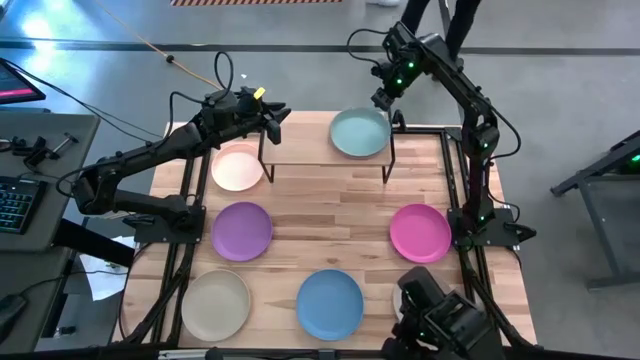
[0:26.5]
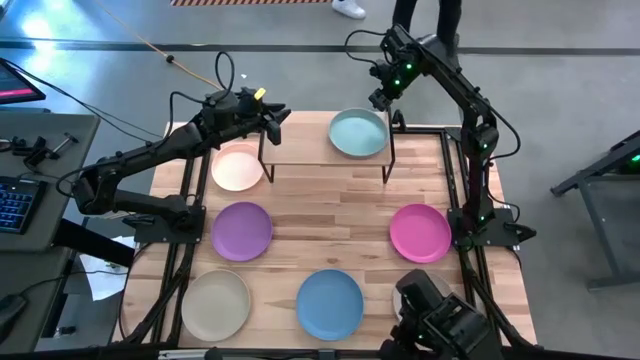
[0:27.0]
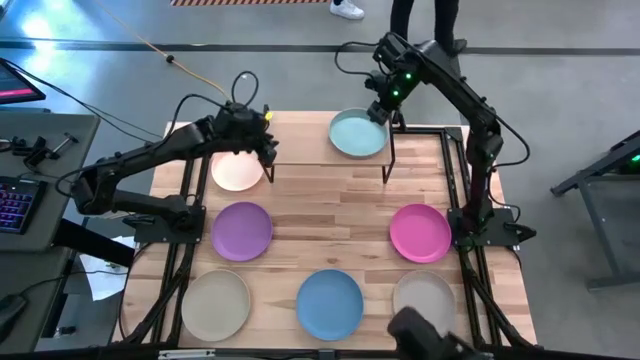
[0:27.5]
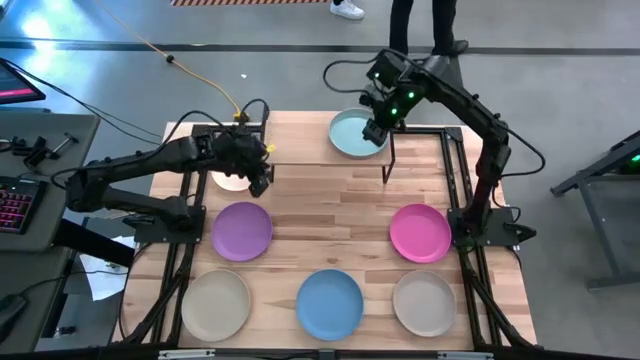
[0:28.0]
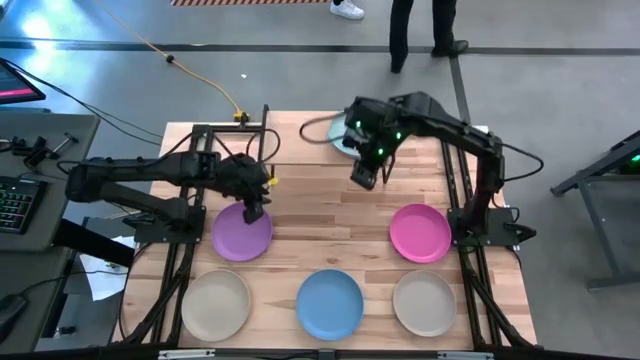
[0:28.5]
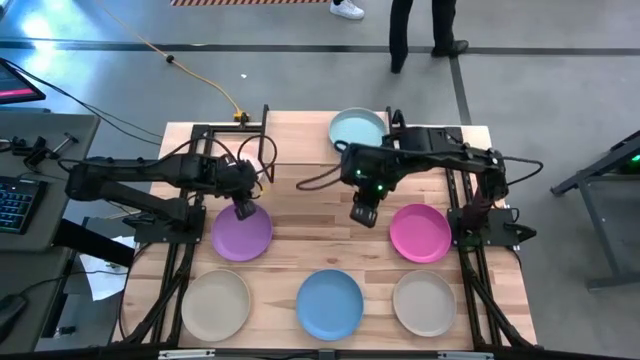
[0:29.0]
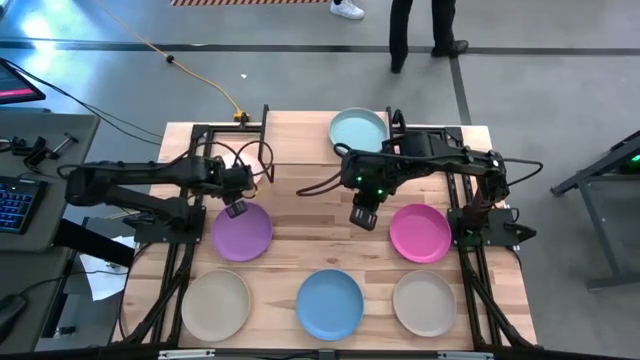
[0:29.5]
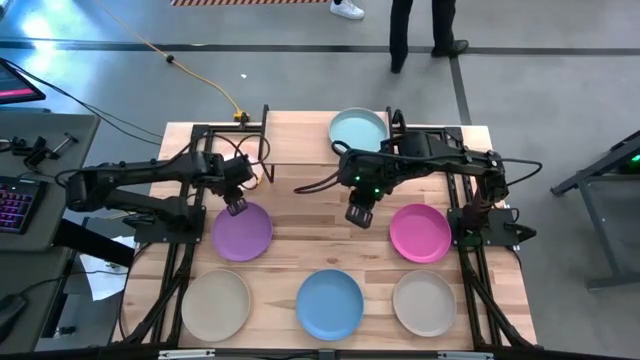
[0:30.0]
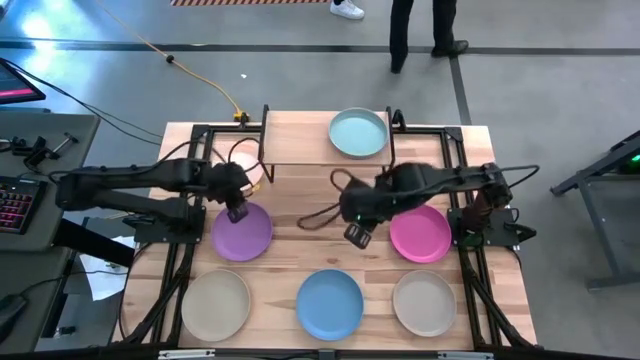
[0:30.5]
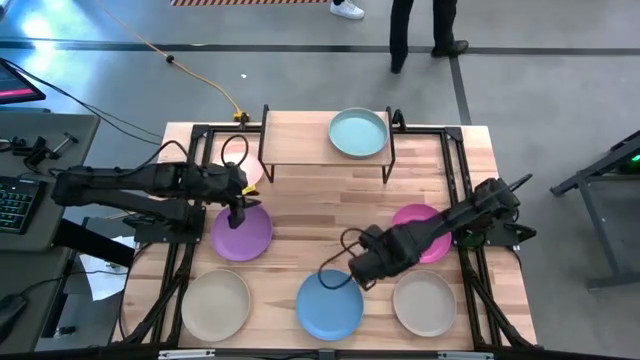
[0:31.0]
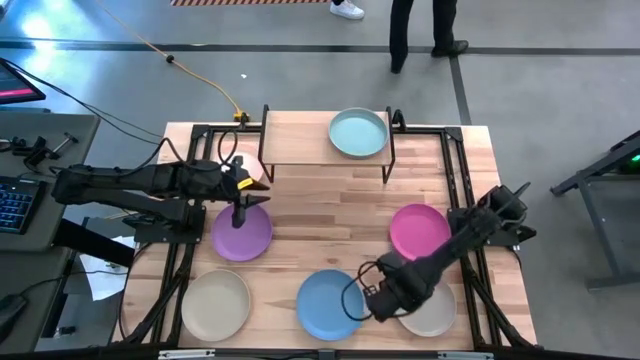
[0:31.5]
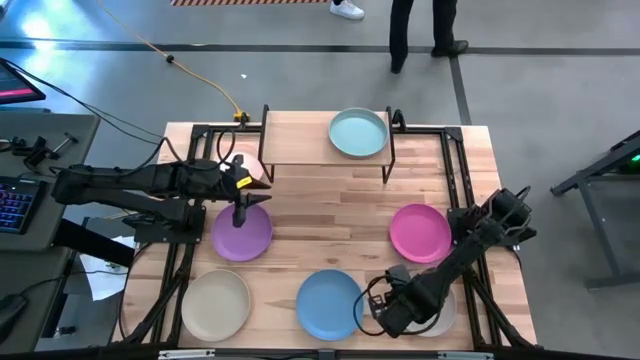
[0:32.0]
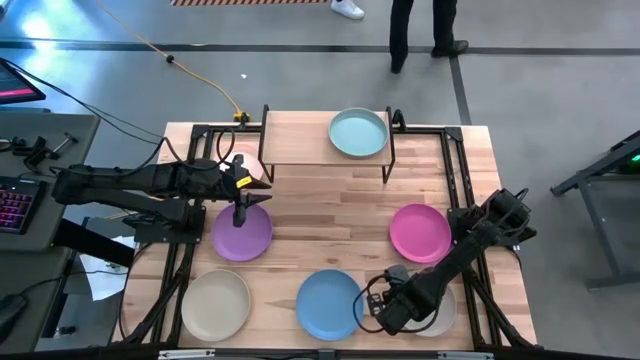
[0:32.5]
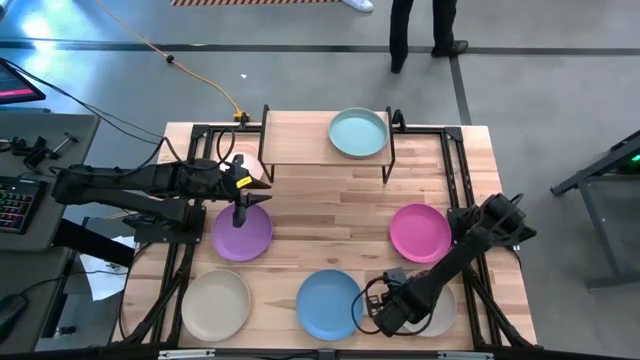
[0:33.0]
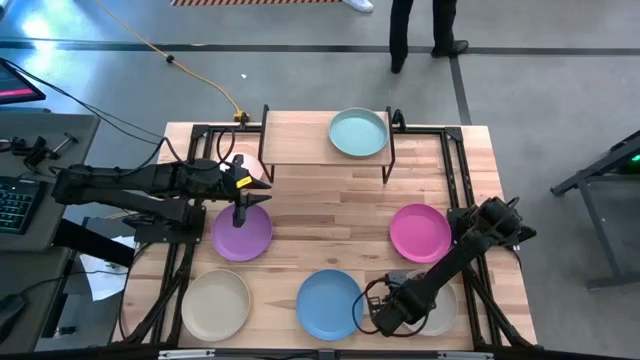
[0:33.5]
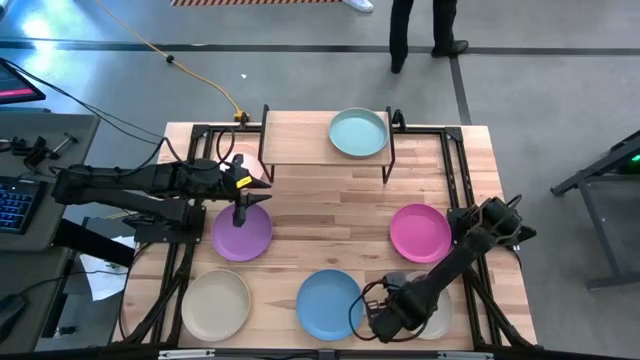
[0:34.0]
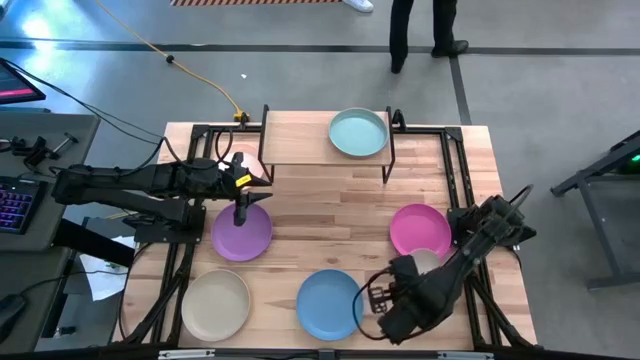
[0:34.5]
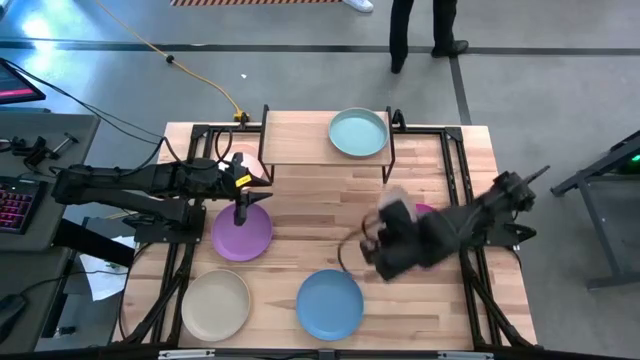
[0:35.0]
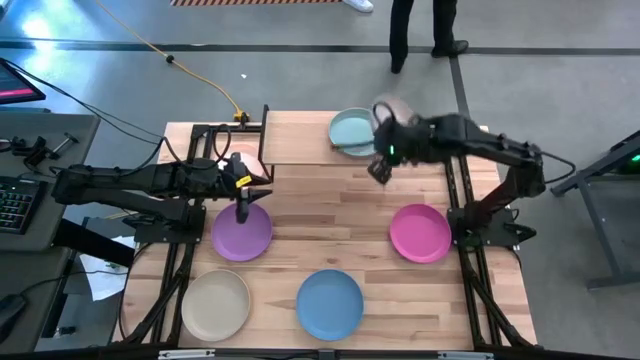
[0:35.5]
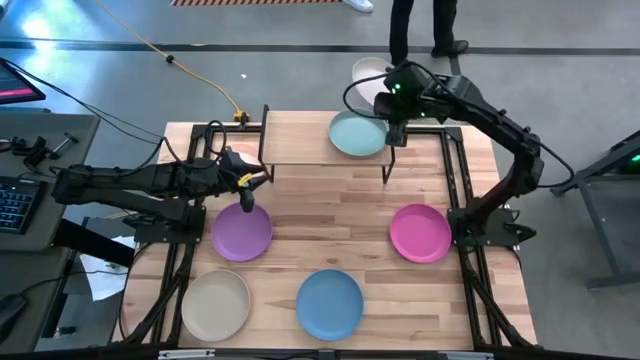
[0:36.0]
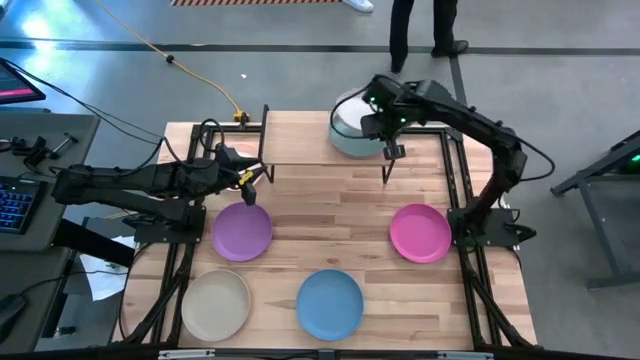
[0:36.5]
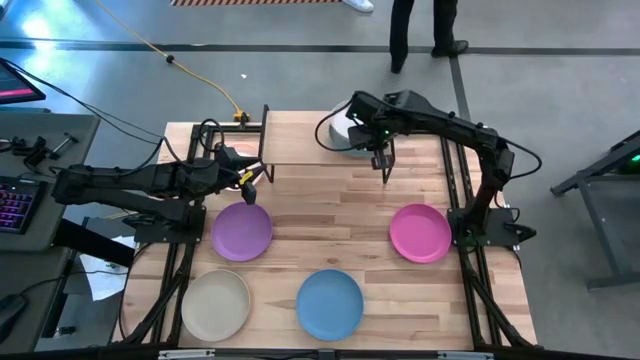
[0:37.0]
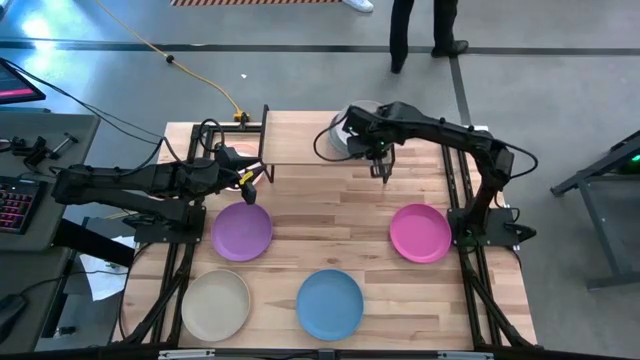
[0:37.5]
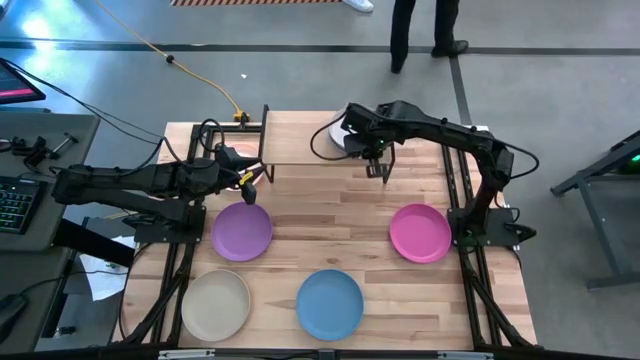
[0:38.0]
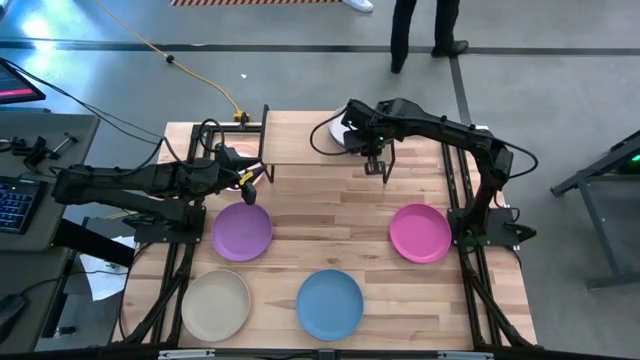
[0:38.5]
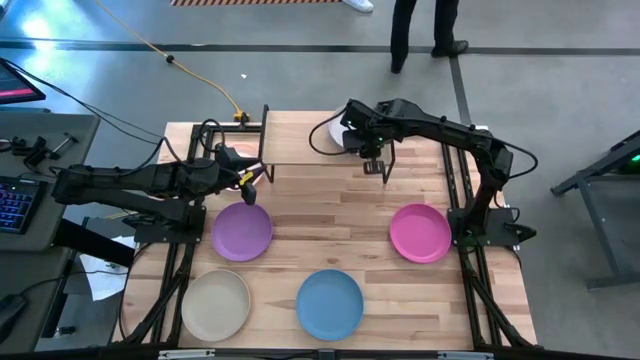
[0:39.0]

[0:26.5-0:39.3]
Task: Place and stack plates onto a shelf
Stack the right gray plate on top of the light green plate on the shelf

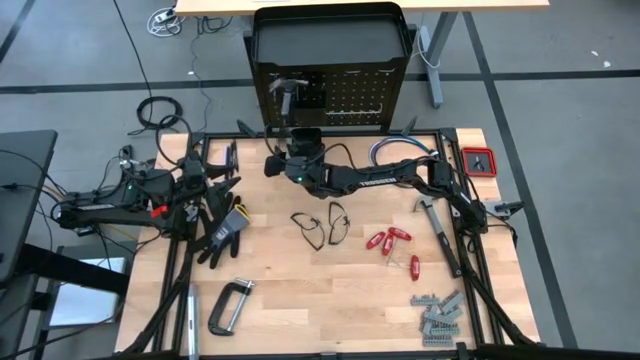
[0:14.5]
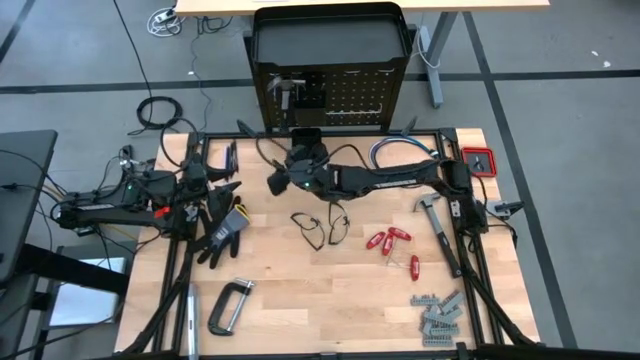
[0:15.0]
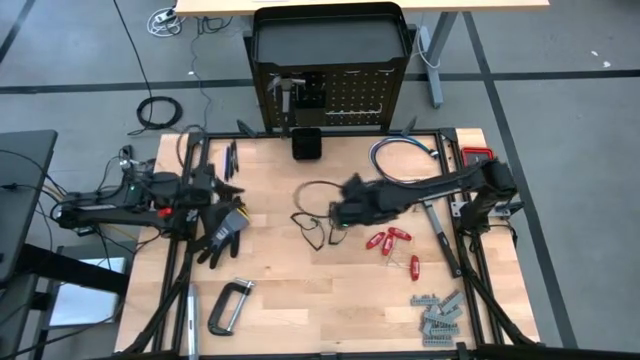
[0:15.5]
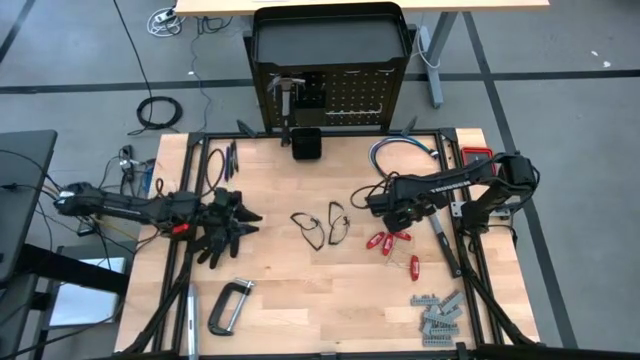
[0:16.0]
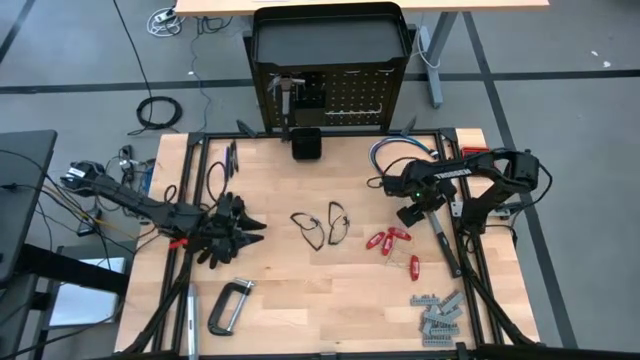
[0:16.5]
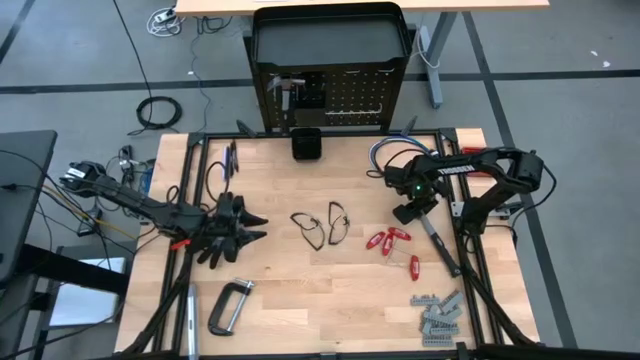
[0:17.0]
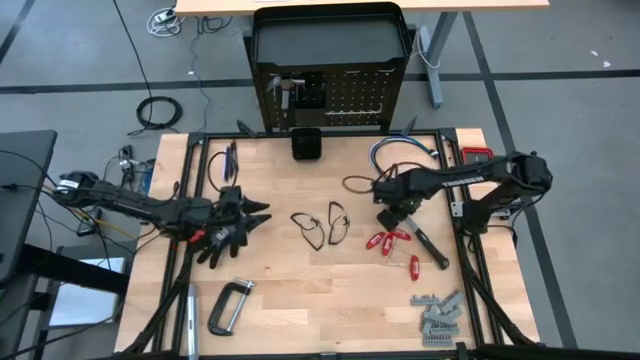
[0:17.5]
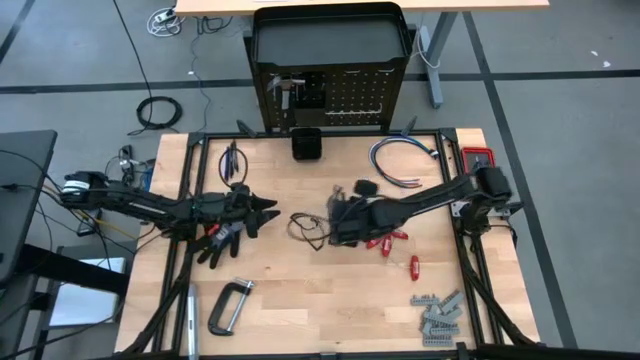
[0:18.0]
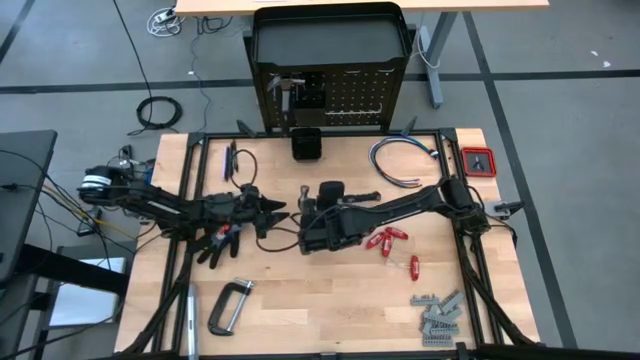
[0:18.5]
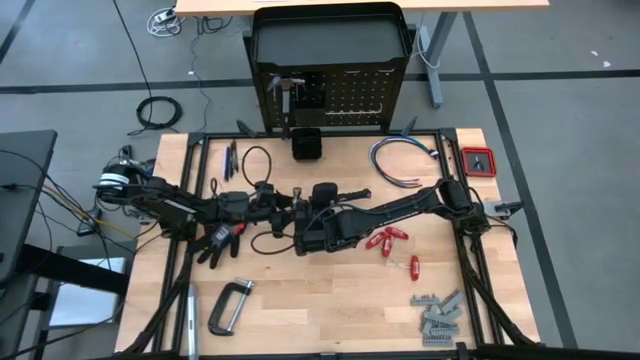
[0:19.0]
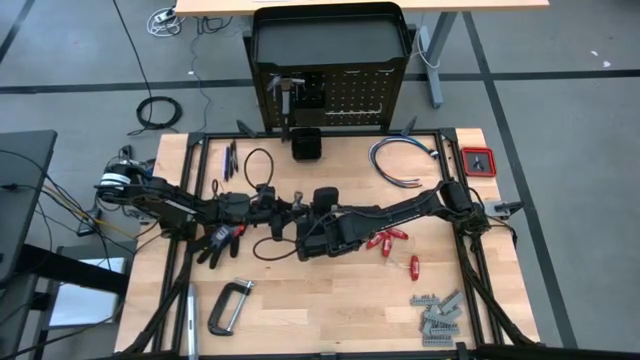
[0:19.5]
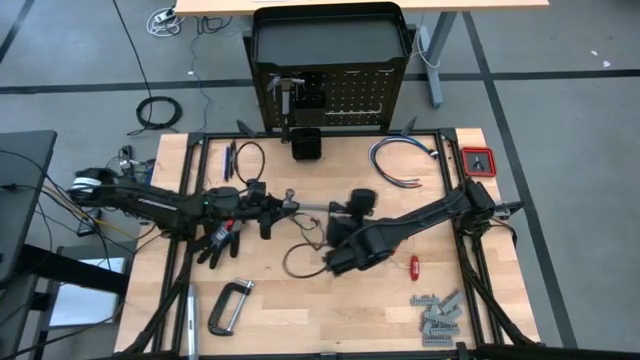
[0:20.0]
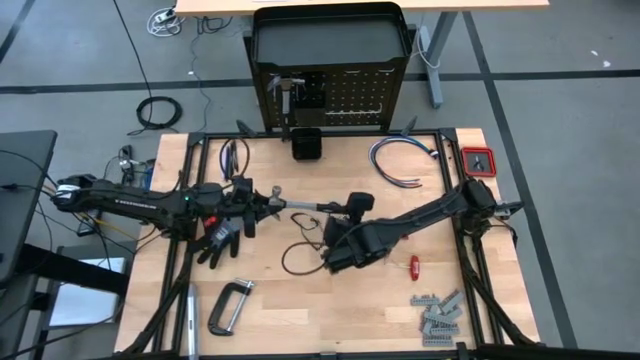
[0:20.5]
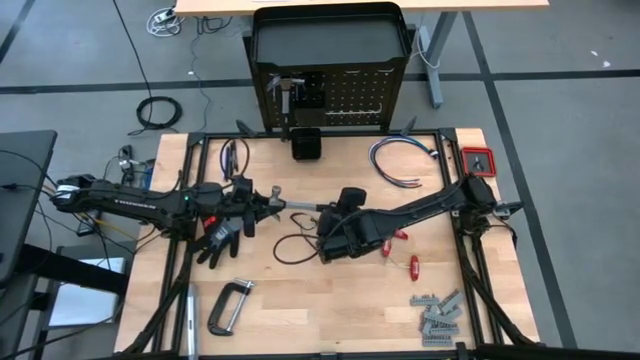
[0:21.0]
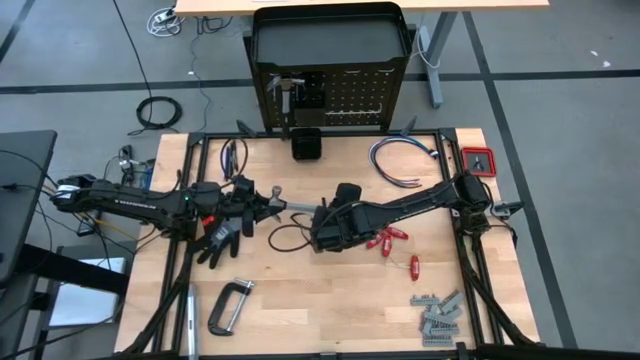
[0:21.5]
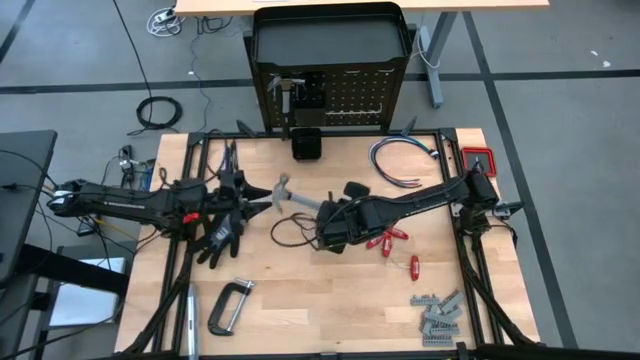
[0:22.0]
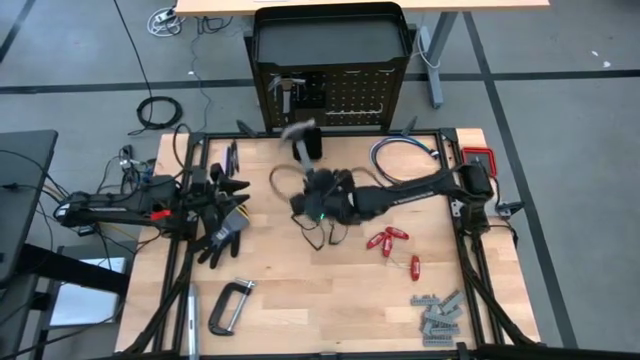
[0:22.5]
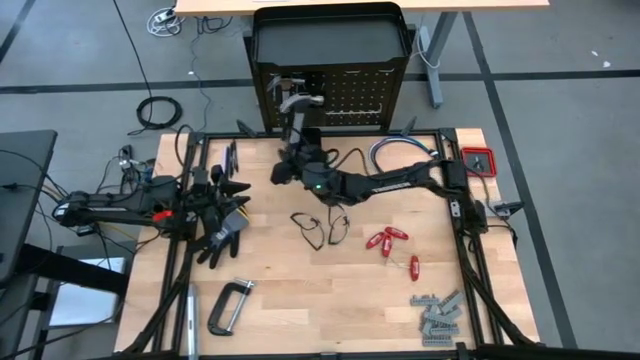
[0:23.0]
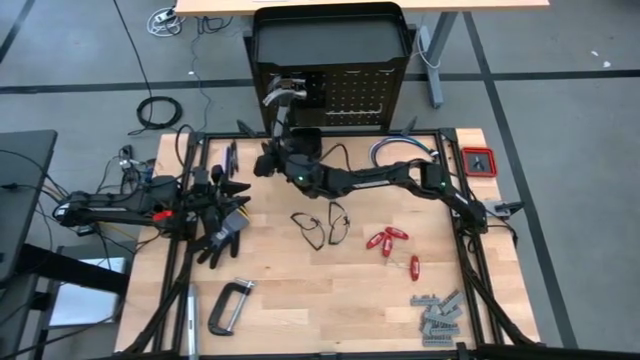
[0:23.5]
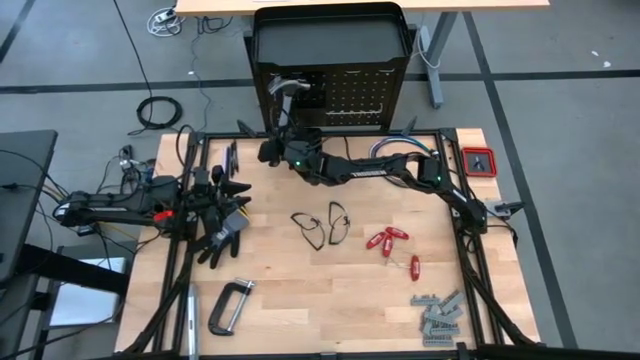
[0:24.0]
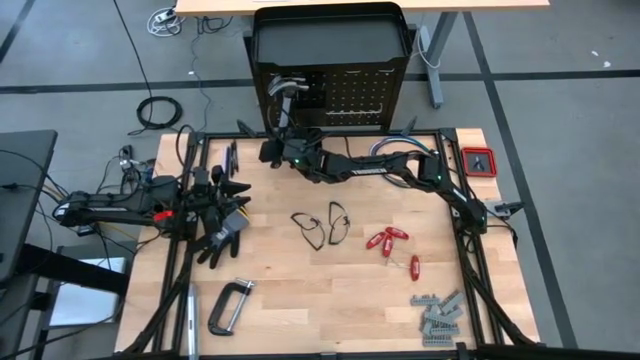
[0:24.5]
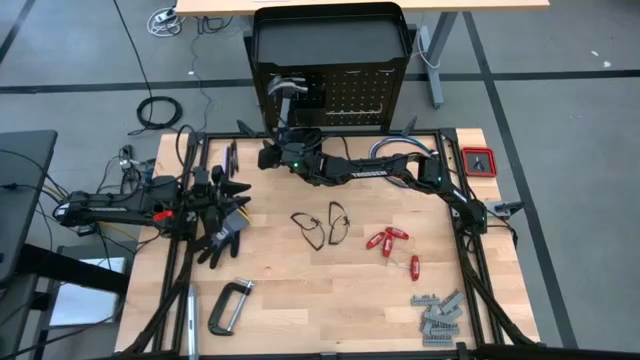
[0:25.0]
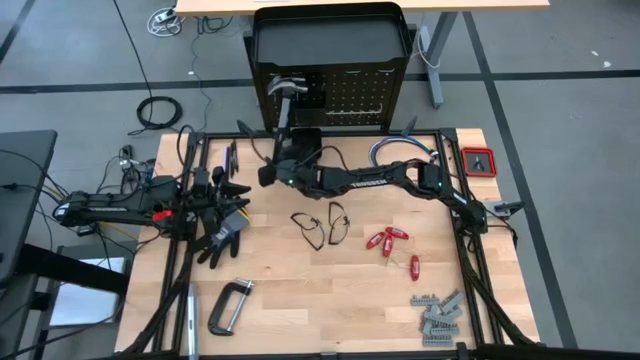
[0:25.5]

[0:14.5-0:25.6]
Task: Hang tools onto peg board
Hang the gray hammer on the peg board
